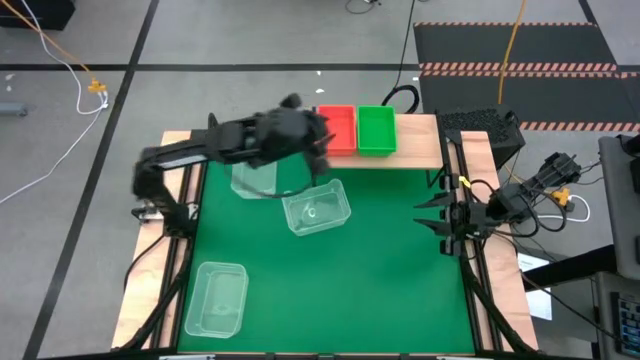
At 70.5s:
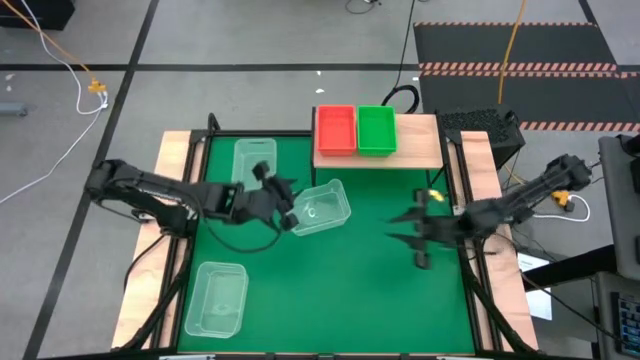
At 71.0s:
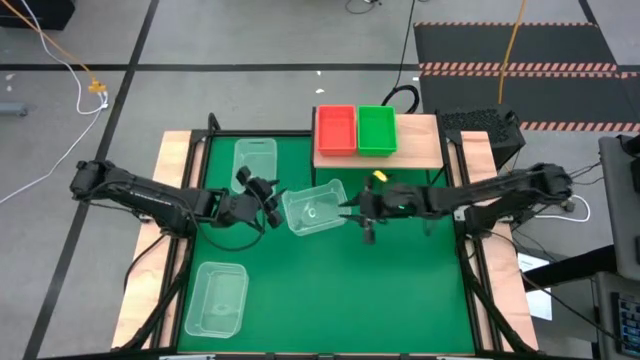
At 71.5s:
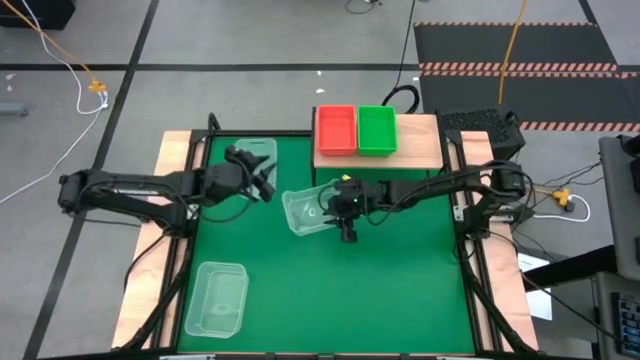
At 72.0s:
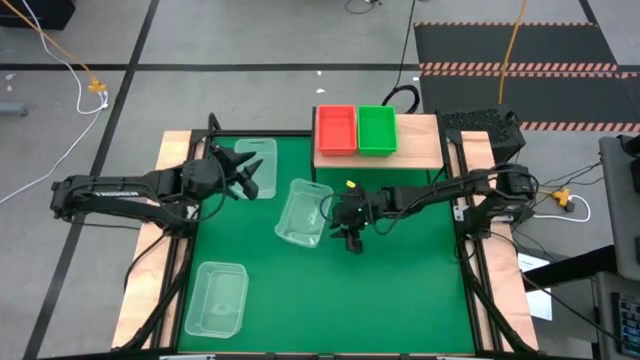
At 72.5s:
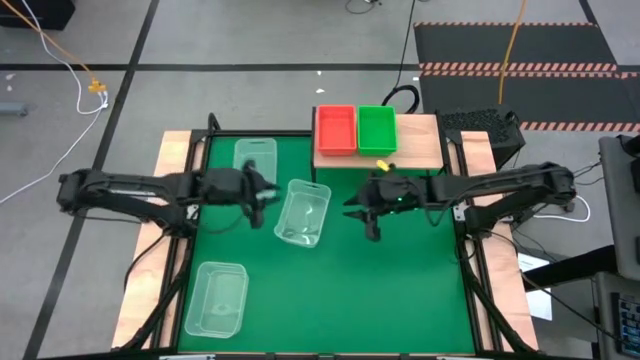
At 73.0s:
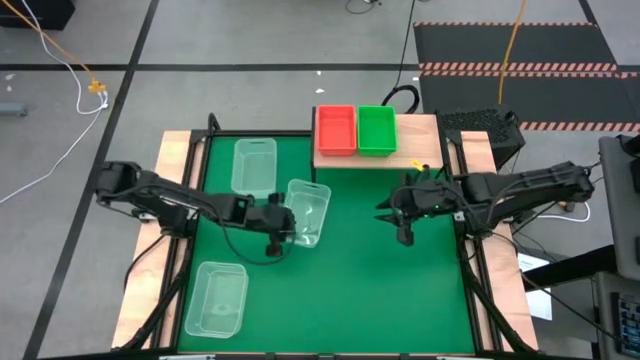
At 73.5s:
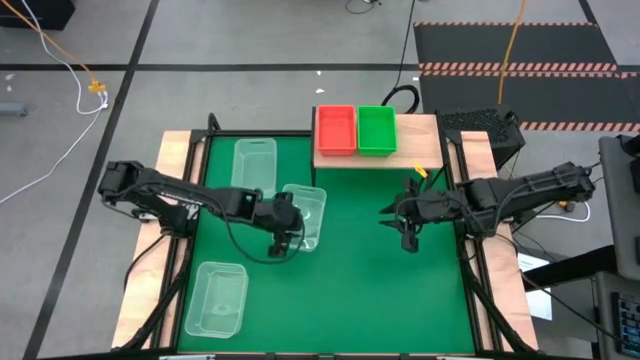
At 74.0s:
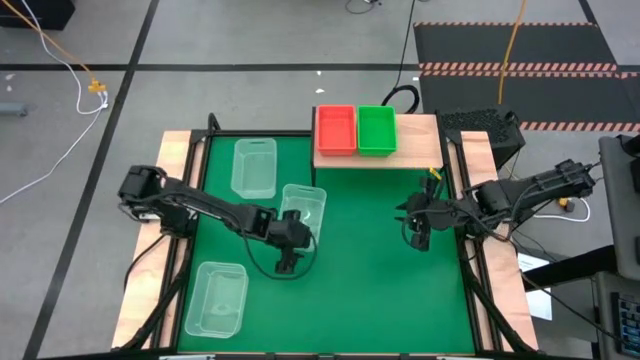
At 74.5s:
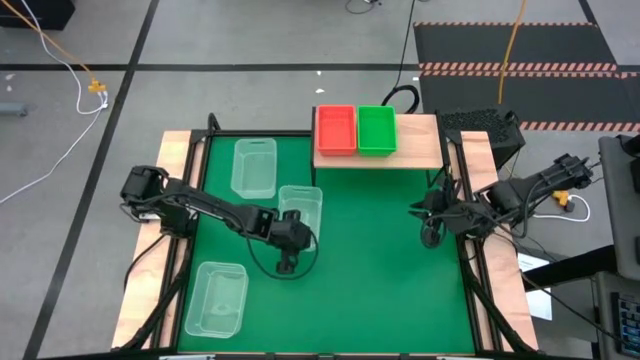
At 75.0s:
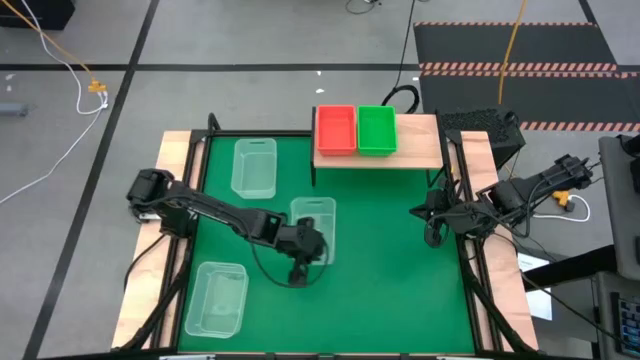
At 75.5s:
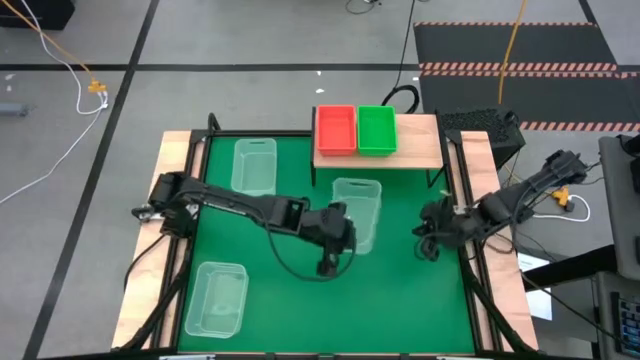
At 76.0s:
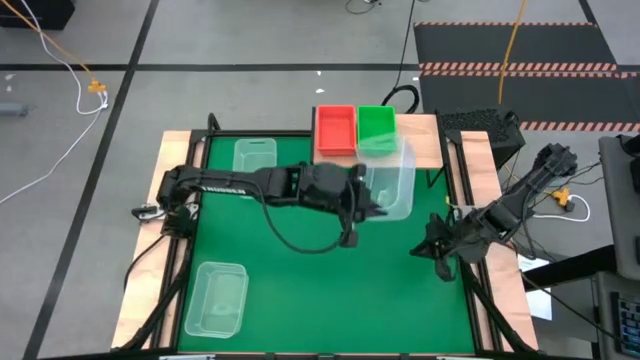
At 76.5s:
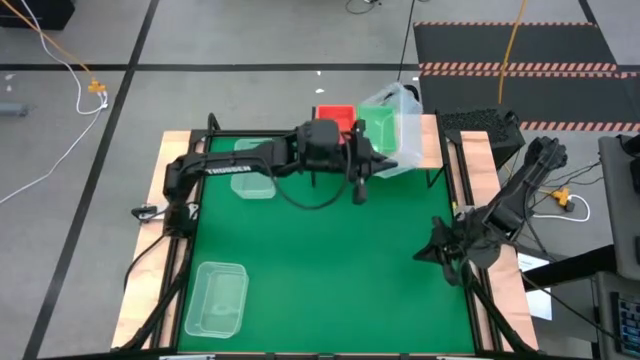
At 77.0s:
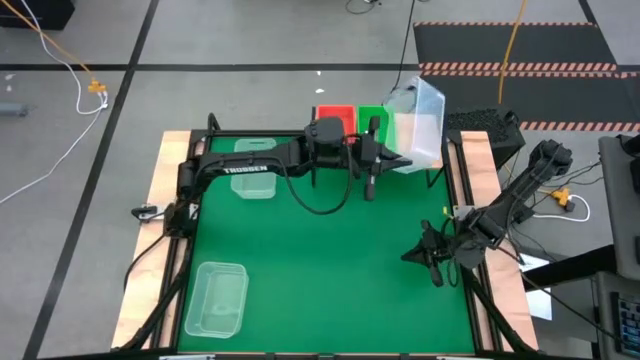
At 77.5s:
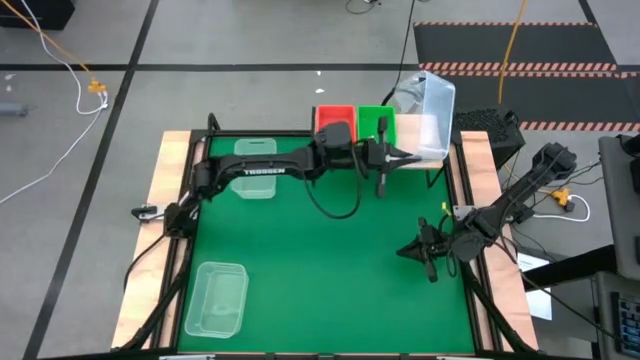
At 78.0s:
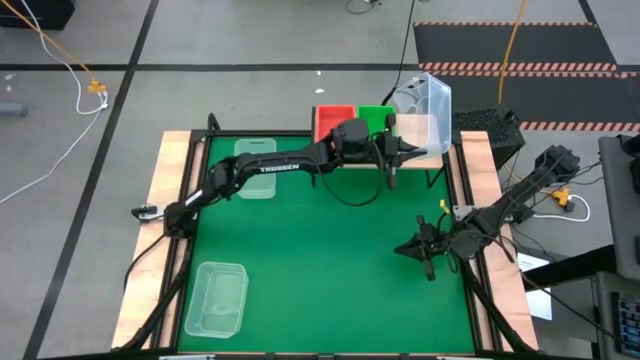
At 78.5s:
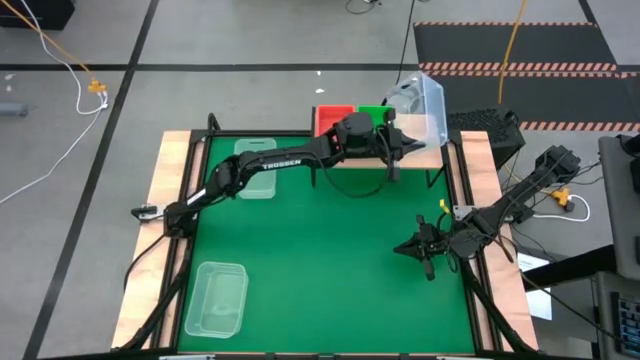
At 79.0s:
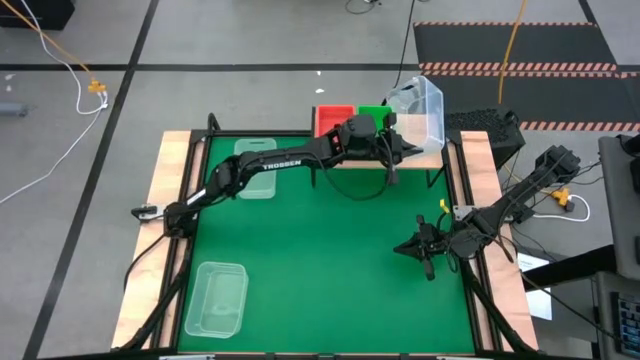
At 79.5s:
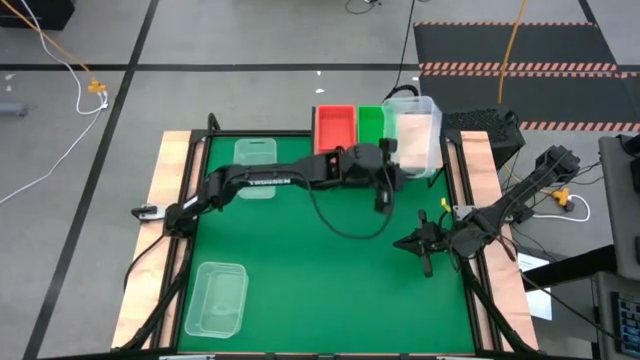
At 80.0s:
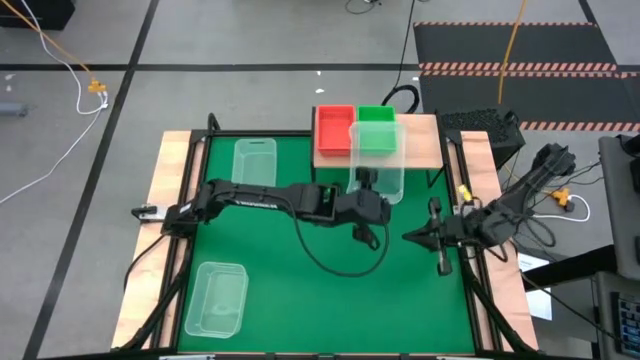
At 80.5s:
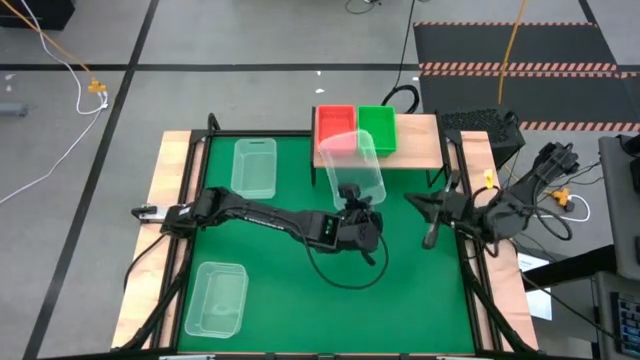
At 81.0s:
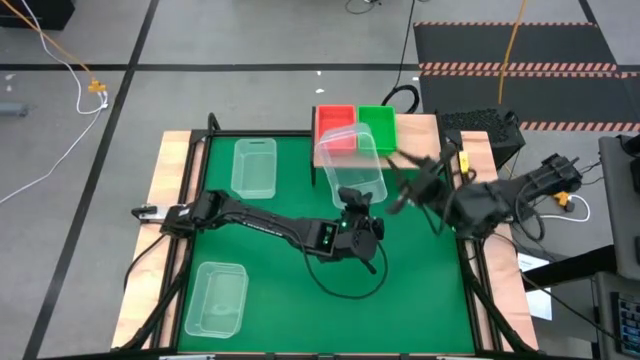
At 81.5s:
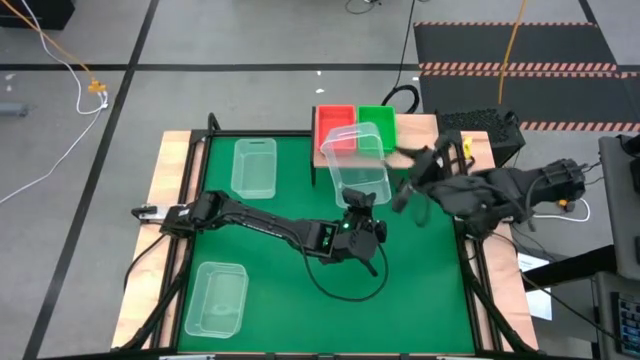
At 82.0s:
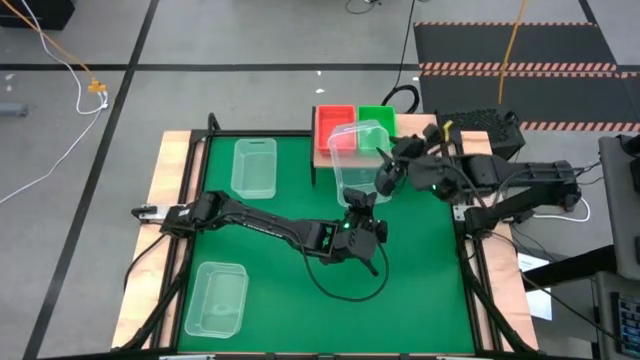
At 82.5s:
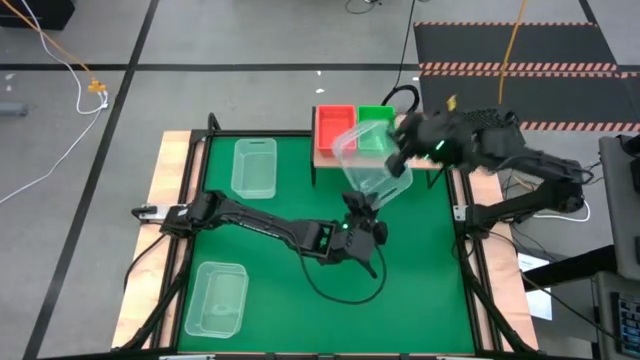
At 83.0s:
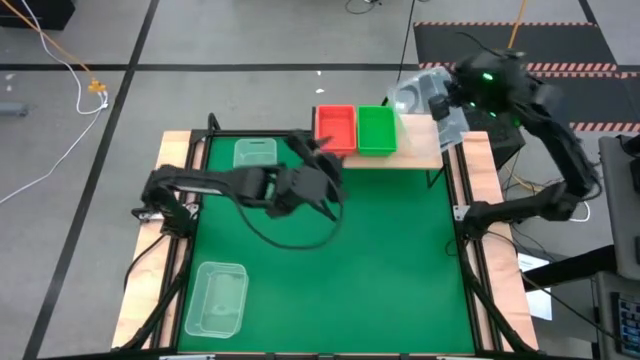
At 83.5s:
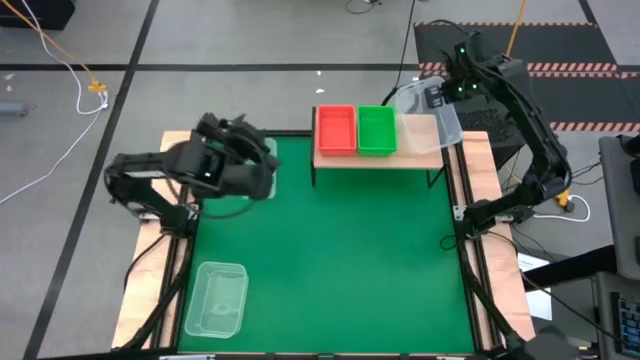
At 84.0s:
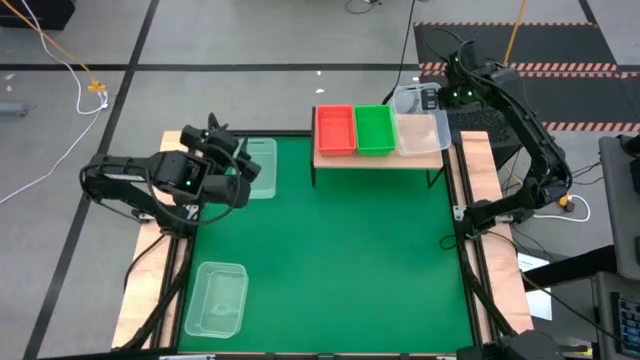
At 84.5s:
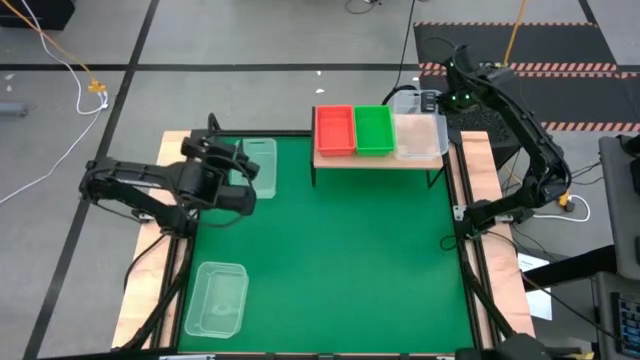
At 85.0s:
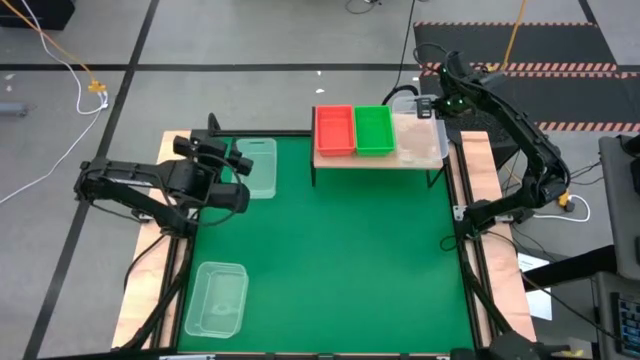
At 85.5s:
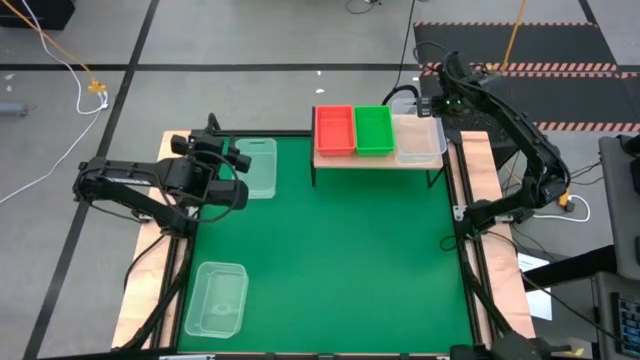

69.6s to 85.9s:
Task: Stack baskets on shelf by color
Put the middle right transparent bin on the shelf

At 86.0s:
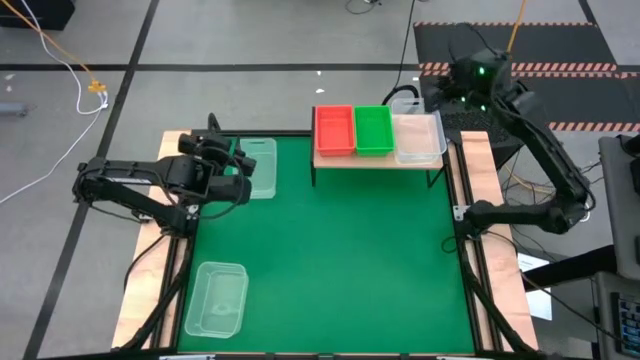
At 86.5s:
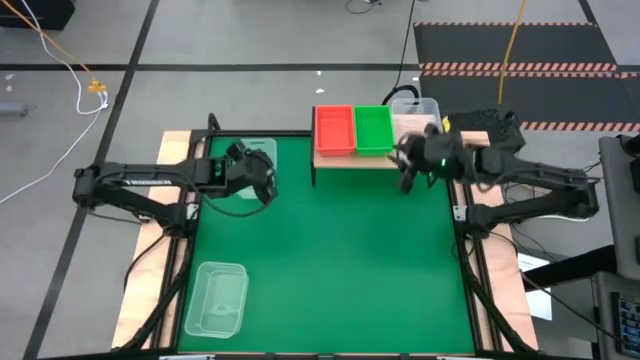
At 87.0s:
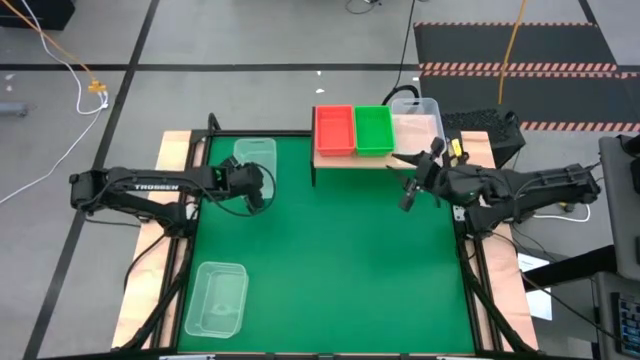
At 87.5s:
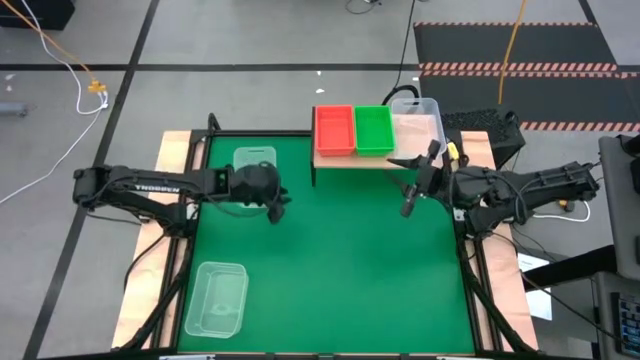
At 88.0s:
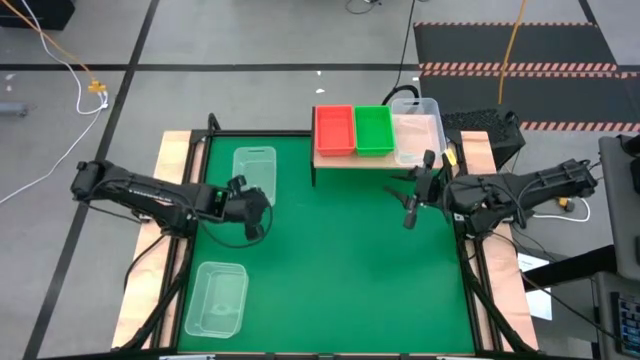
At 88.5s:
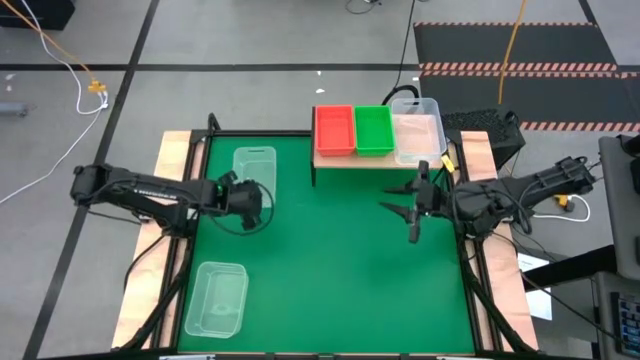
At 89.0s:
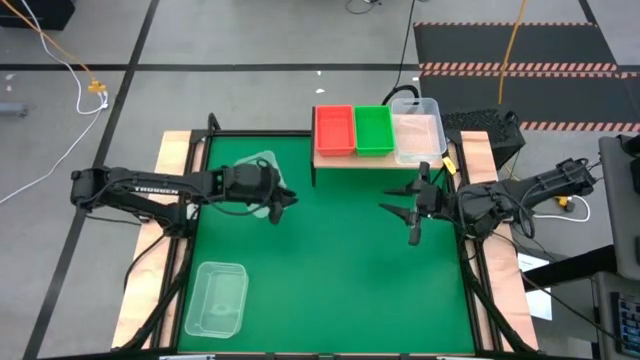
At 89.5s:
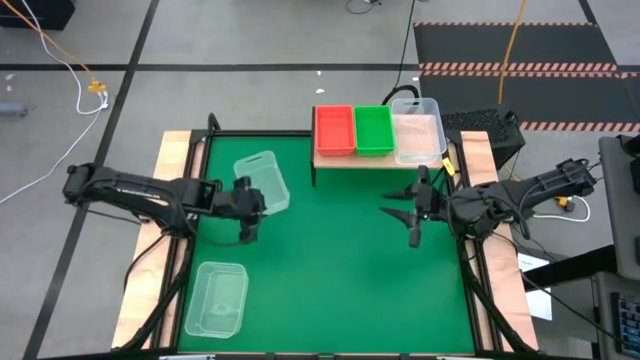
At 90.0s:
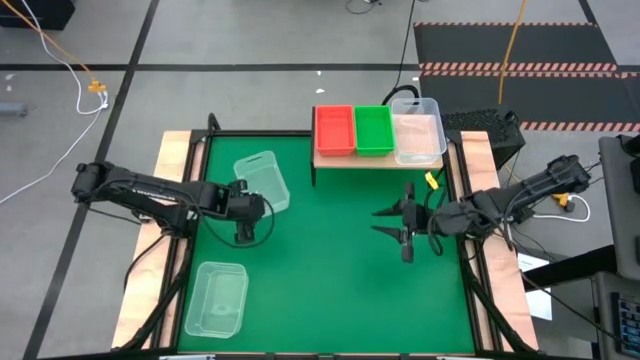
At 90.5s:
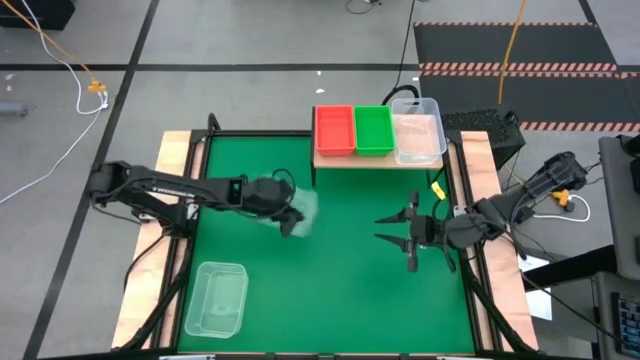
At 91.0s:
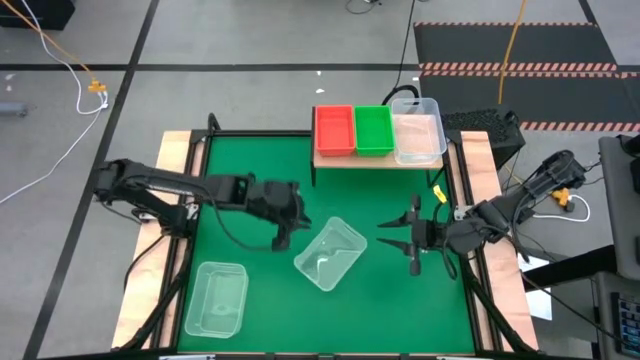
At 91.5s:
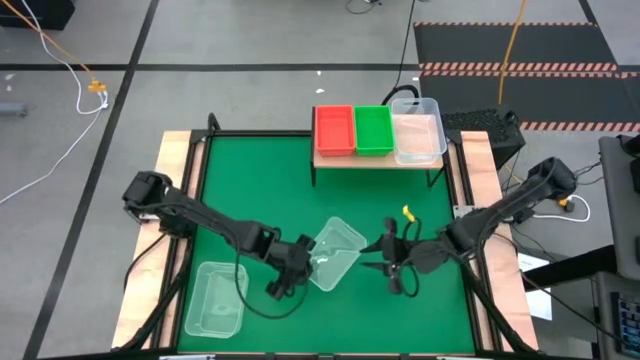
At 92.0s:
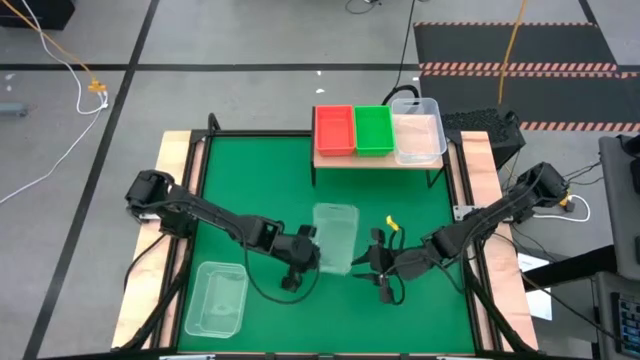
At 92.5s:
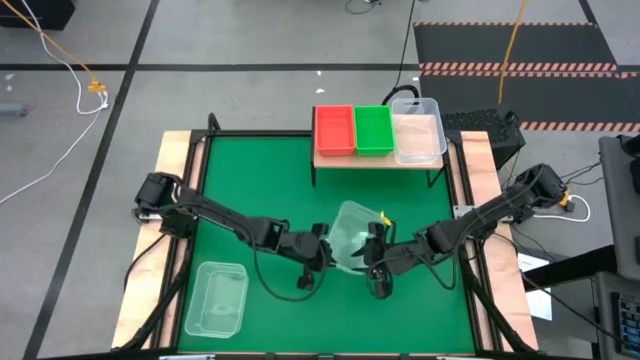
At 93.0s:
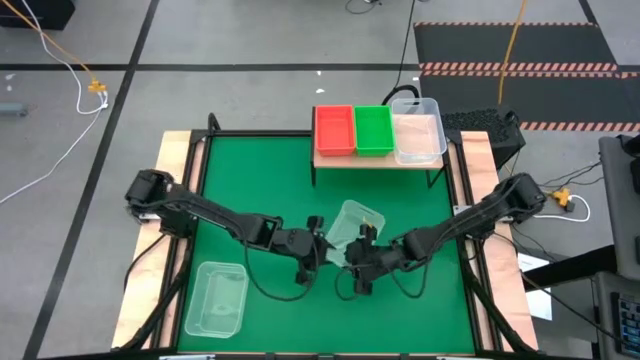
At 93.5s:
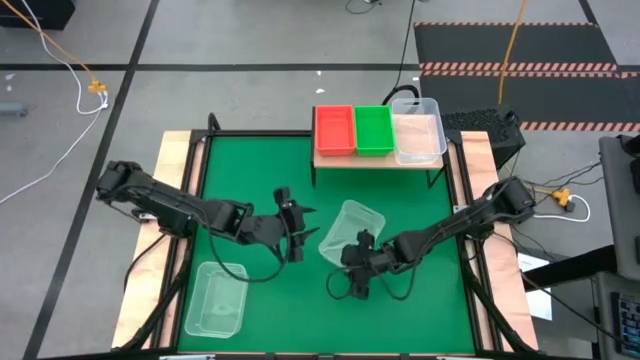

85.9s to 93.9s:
Stack the top transparent bin on the top of the transparent bin
